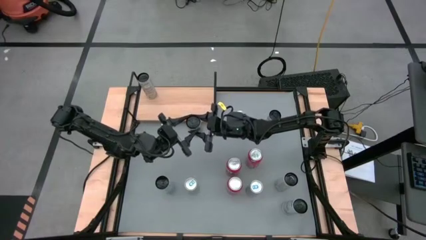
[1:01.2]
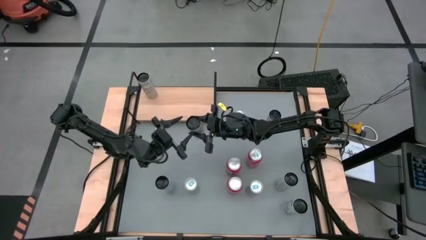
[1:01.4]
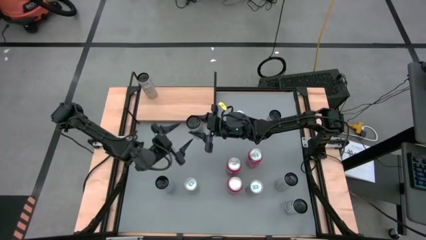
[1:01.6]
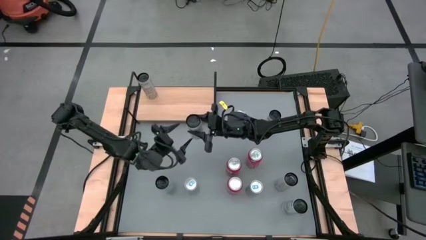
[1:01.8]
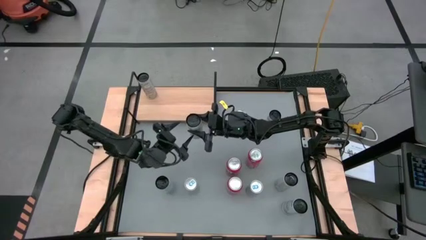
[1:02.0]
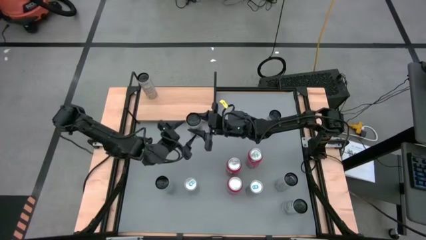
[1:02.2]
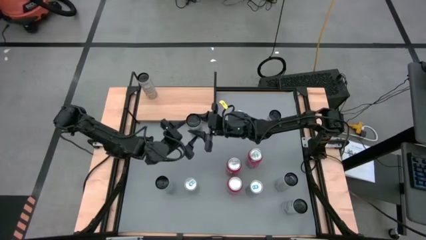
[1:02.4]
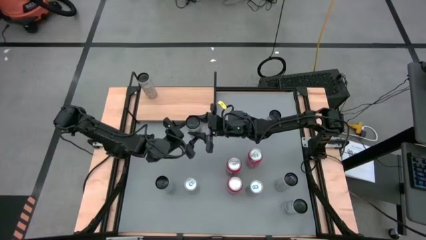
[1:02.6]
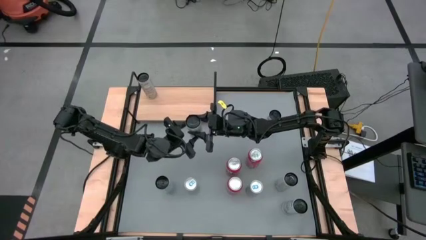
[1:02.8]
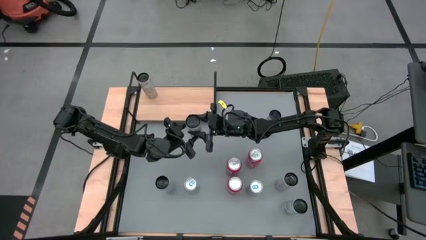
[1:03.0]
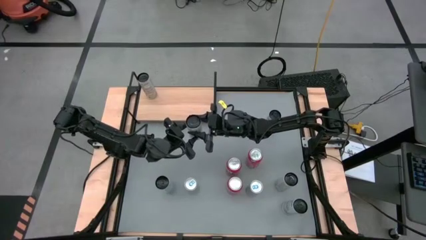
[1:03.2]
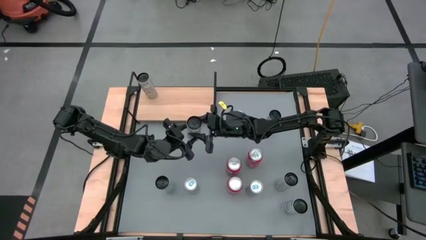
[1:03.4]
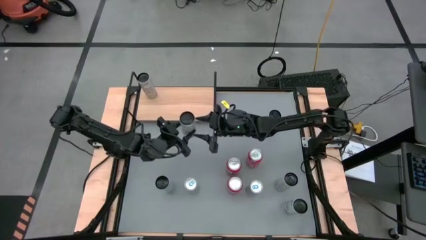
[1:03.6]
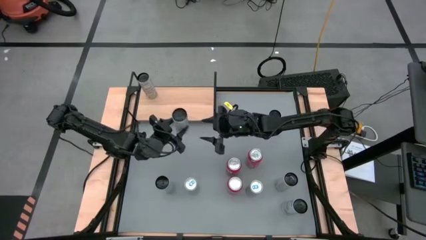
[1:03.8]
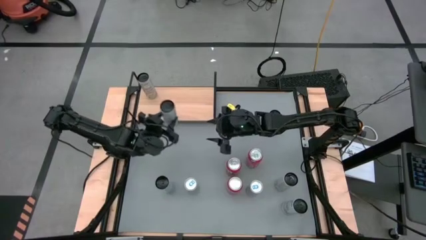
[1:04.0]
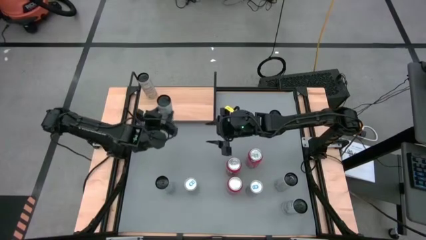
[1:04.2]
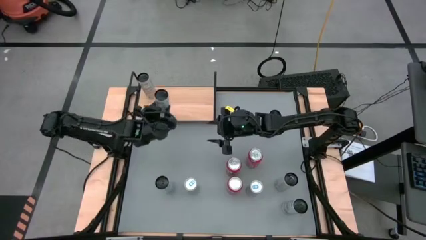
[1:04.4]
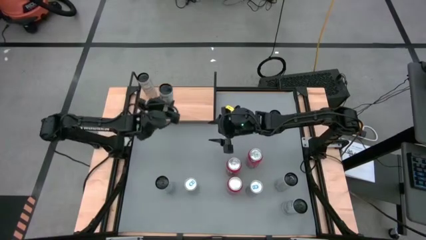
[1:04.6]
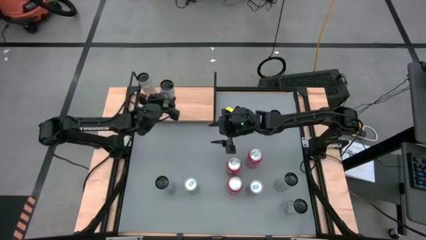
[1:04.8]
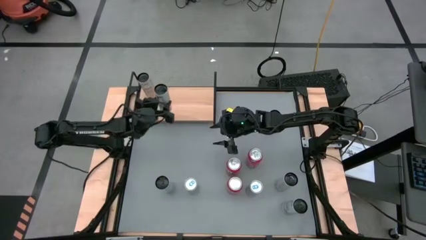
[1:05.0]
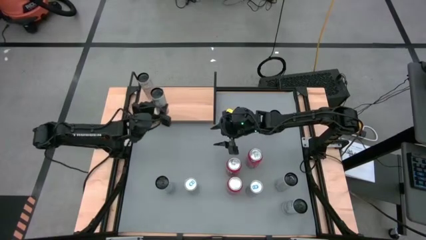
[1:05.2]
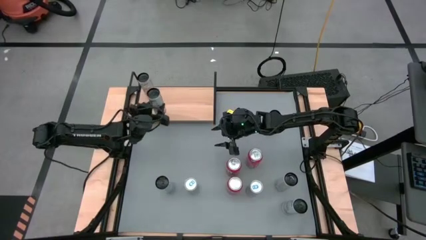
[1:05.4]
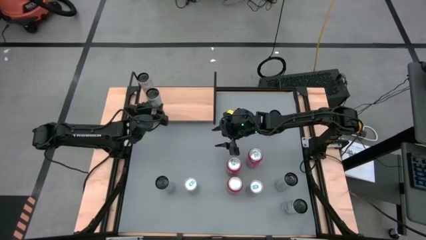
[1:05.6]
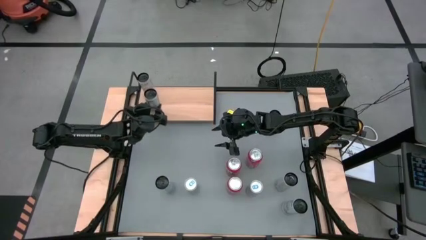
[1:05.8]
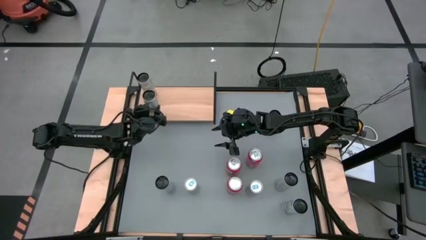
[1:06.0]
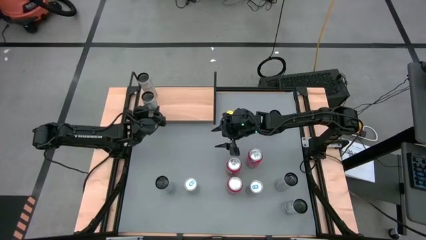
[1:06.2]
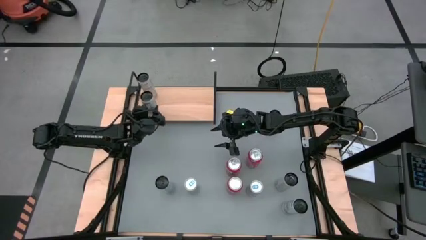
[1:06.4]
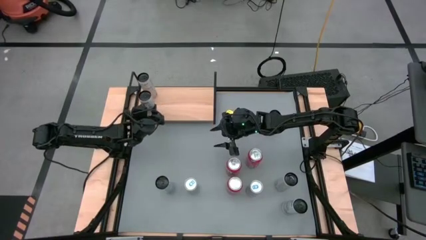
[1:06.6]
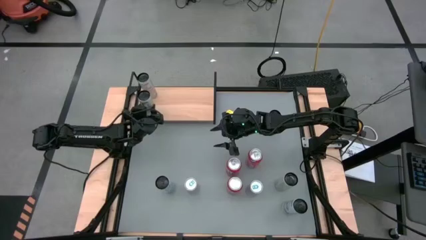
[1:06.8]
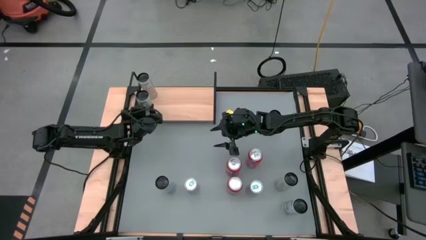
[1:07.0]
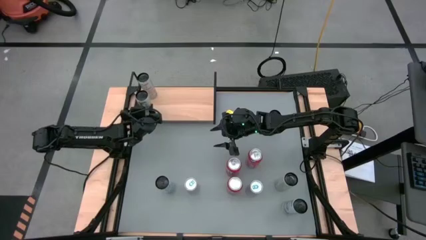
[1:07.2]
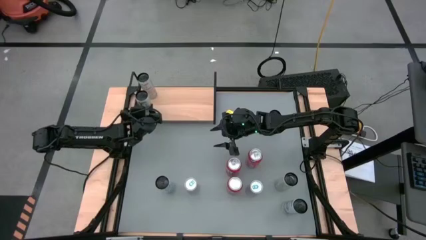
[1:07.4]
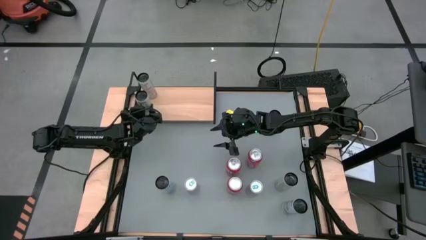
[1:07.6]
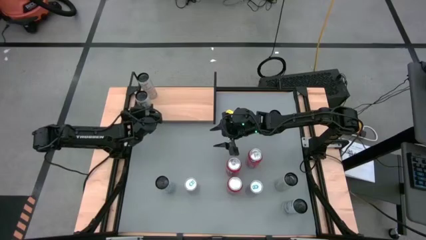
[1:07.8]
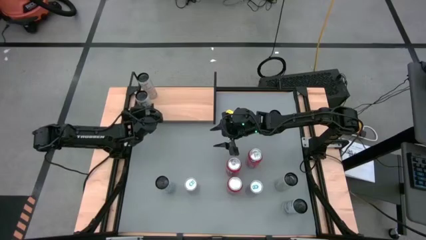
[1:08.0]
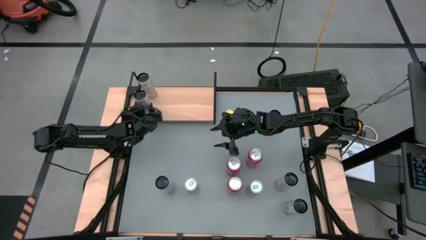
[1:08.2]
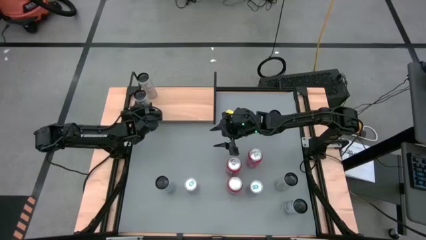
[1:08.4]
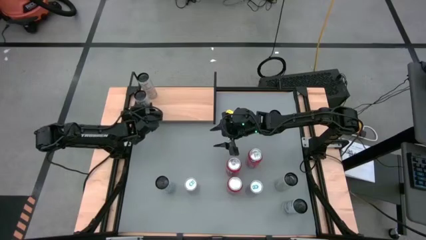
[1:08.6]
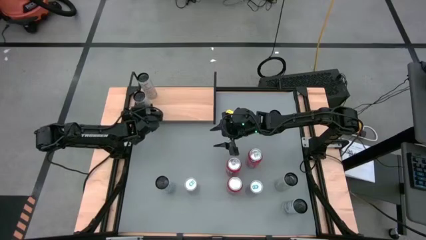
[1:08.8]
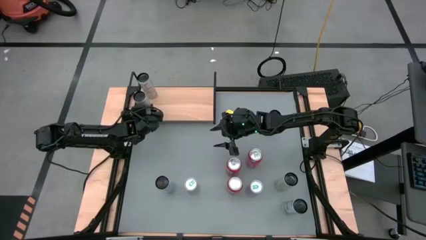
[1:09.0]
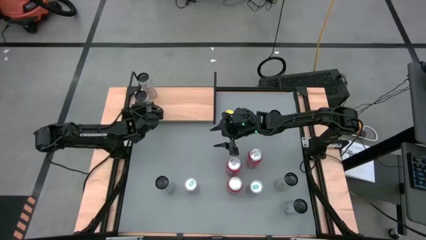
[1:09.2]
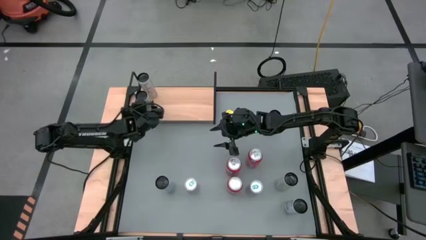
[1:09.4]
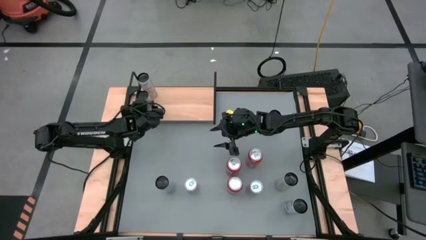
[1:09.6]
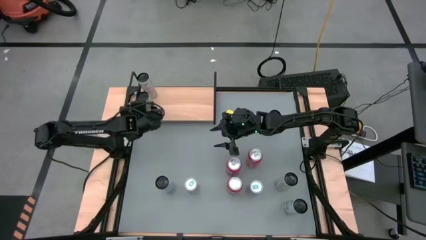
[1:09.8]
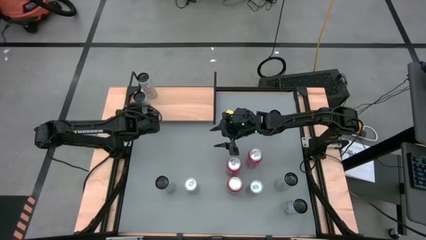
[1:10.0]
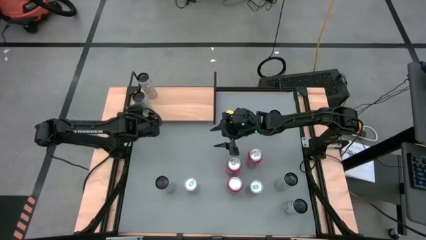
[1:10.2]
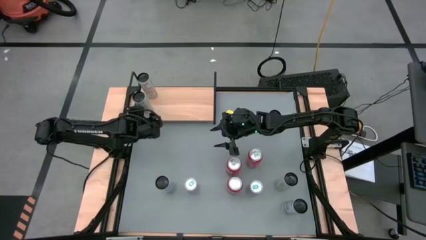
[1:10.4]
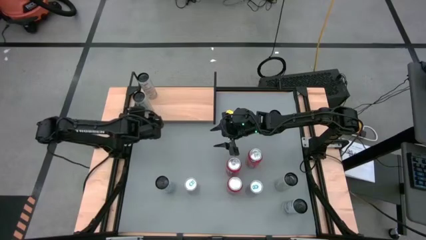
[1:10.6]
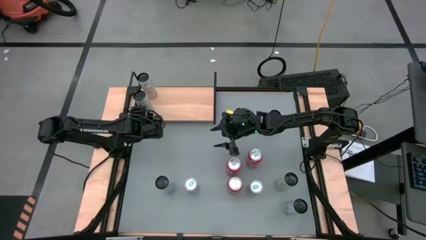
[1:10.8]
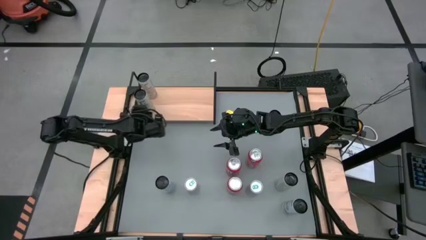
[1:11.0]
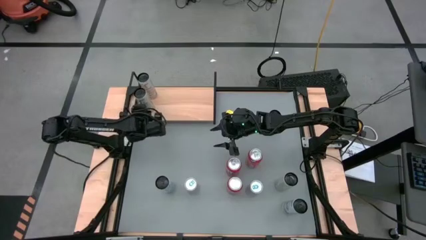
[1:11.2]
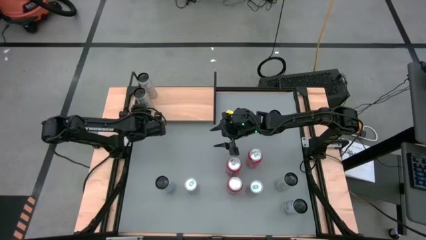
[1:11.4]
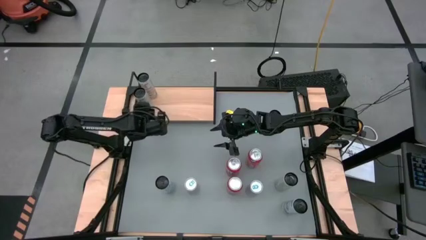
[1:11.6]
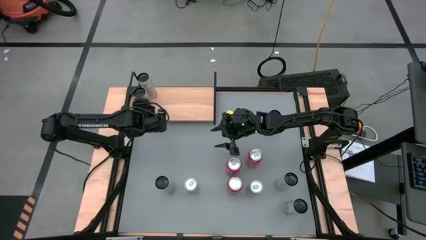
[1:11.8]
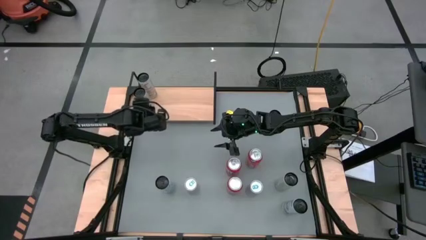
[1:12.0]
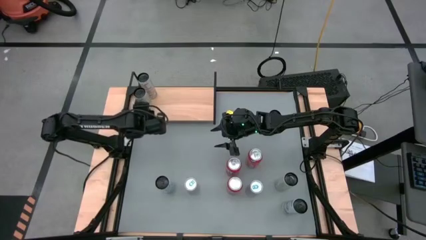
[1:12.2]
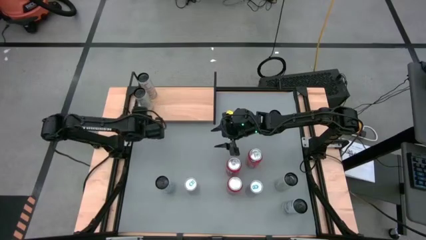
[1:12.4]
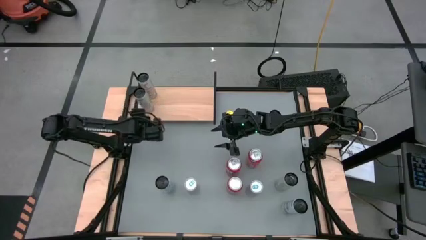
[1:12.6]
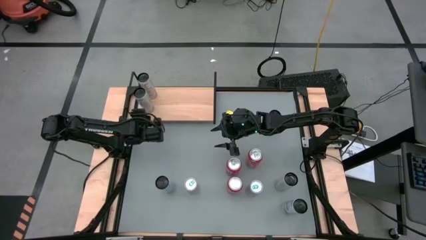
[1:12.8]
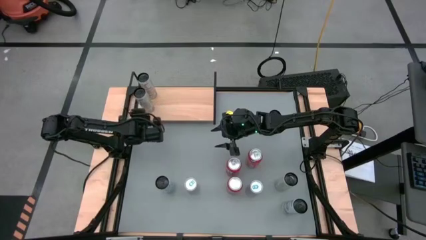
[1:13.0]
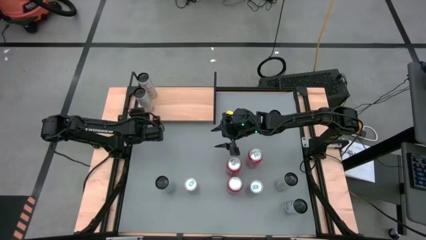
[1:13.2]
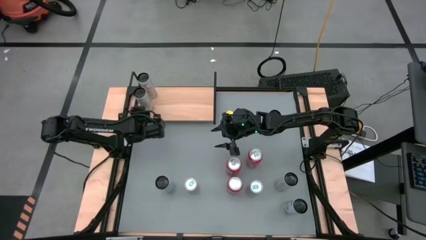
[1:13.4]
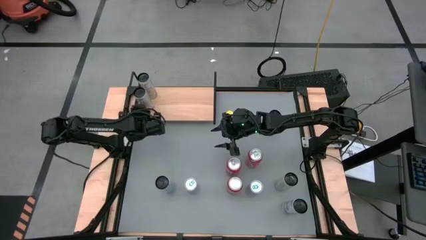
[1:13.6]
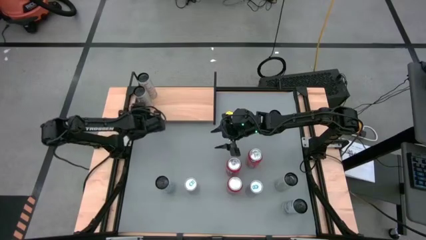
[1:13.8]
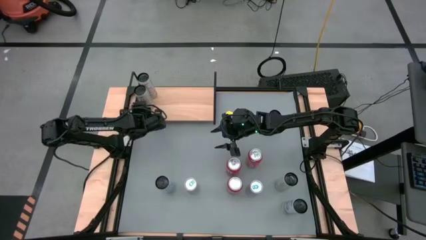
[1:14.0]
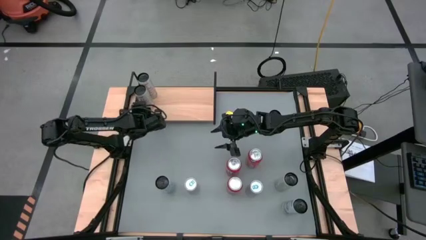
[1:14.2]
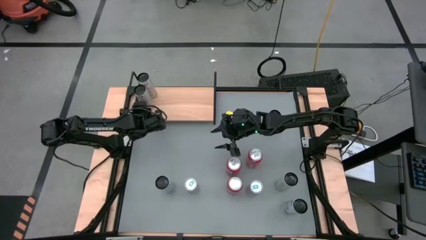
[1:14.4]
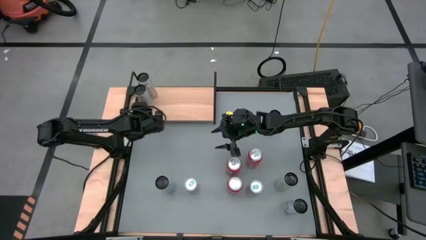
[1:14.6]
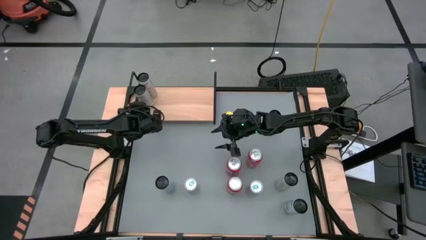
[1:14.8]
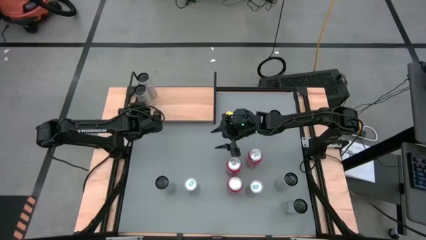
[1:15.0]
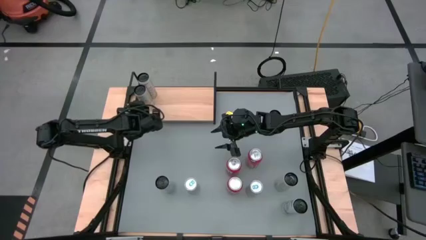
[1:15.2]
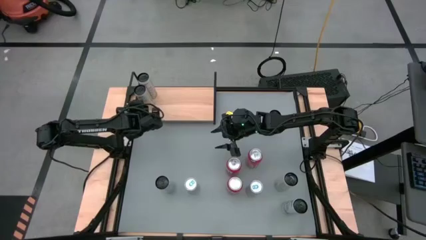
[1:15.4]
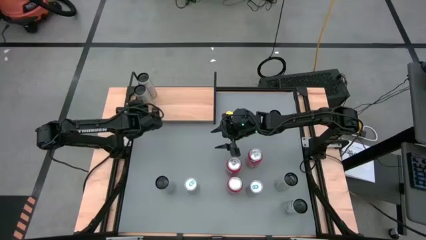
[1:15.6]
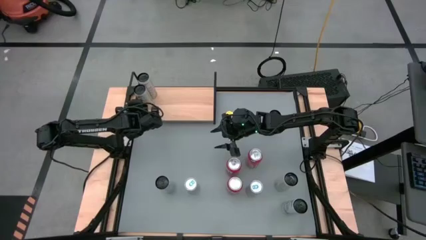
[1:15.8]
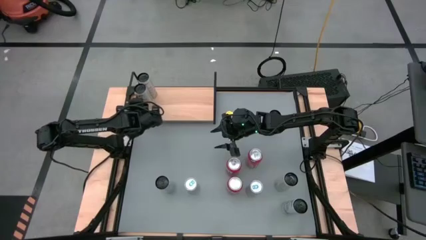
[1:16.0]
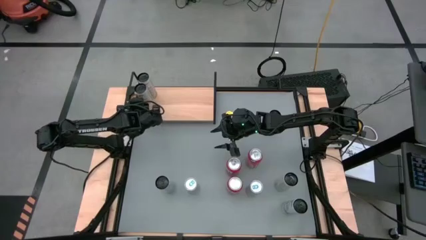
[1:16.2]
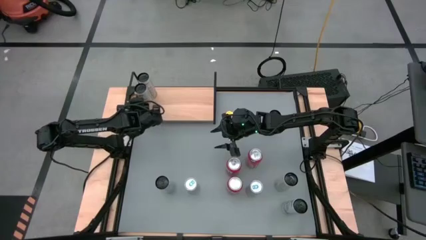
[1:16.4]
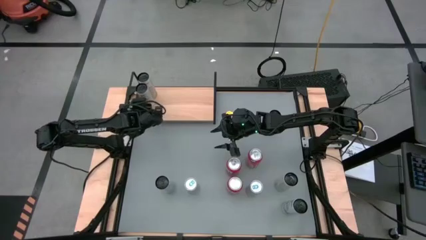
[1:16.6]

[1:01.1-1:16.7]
Task: Place canned beverage on shelf
Put the top white-yellow soda can on the shelf aligned with the other white-yellow soda can
